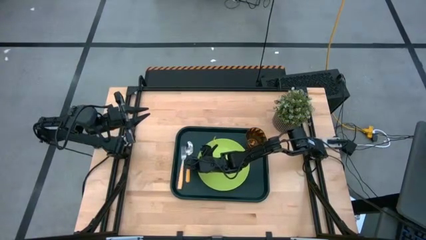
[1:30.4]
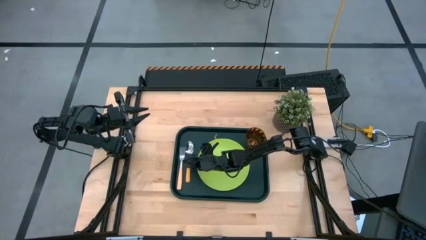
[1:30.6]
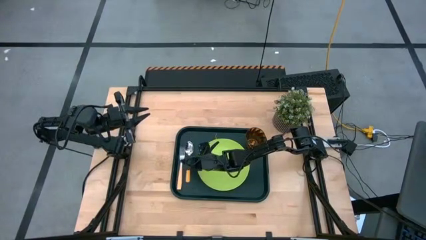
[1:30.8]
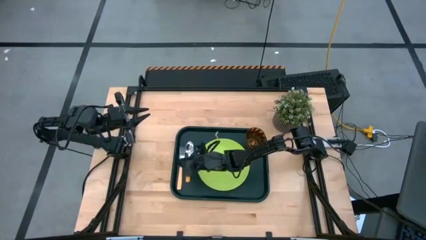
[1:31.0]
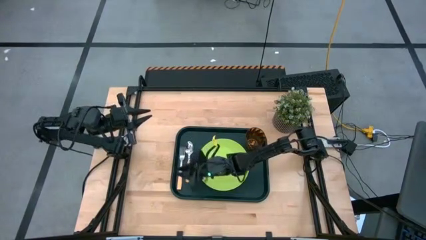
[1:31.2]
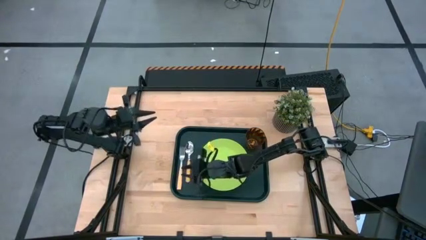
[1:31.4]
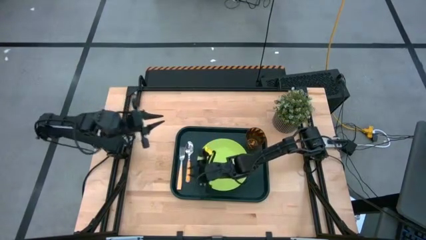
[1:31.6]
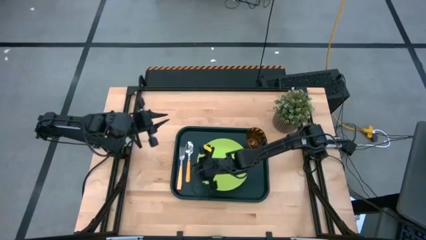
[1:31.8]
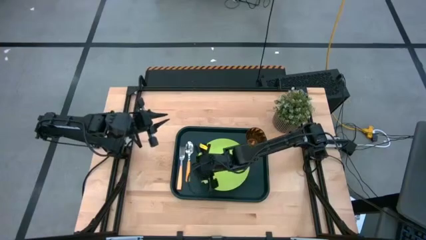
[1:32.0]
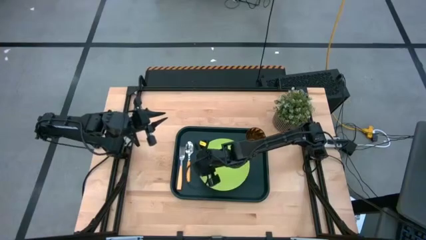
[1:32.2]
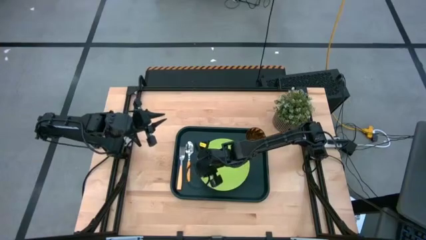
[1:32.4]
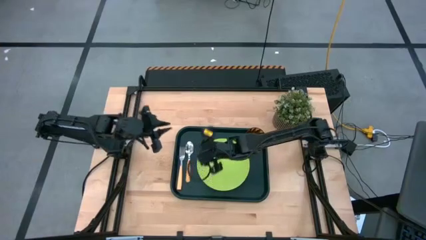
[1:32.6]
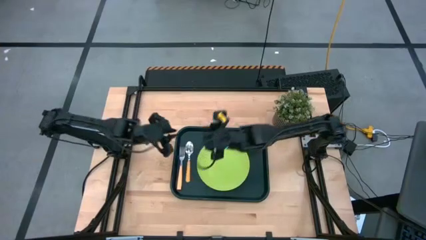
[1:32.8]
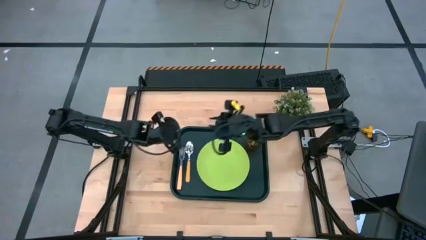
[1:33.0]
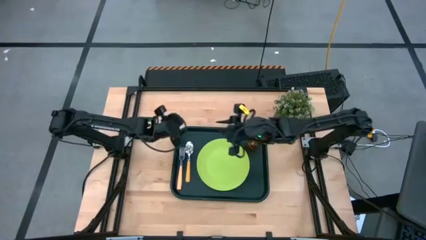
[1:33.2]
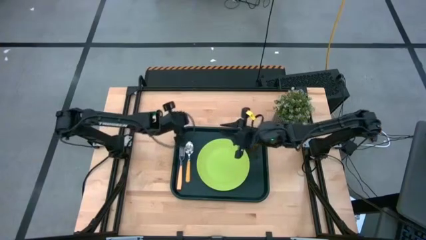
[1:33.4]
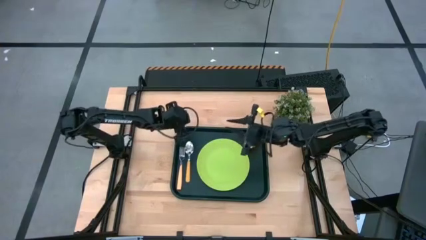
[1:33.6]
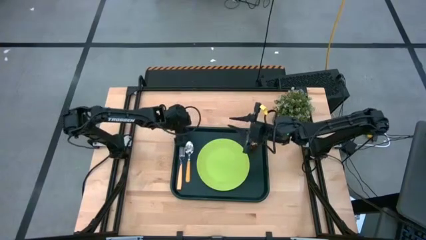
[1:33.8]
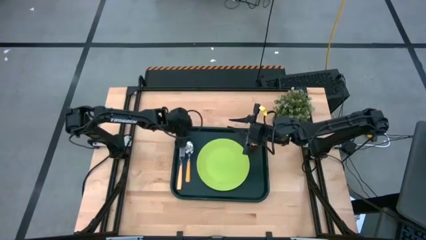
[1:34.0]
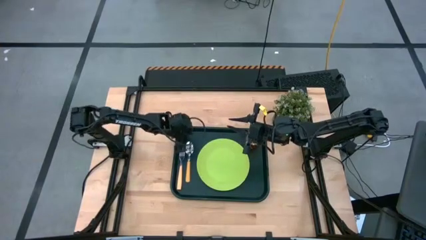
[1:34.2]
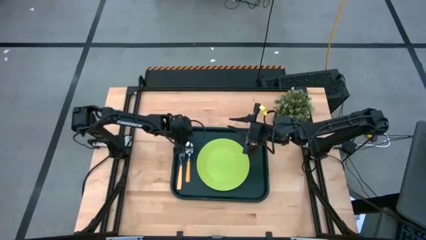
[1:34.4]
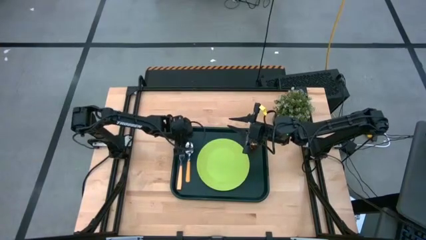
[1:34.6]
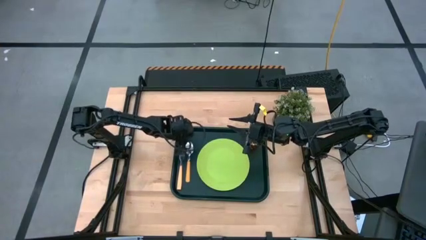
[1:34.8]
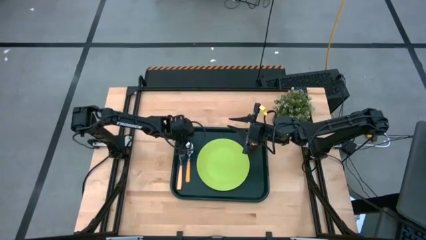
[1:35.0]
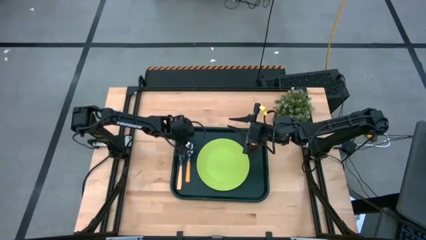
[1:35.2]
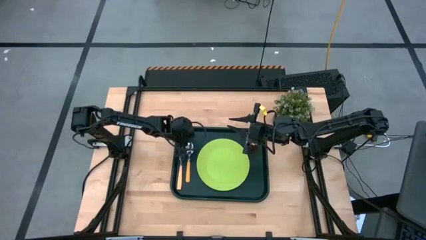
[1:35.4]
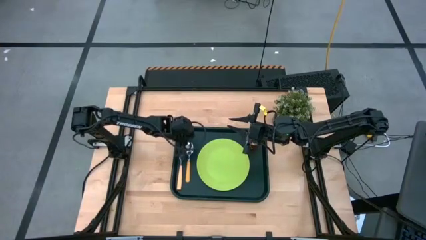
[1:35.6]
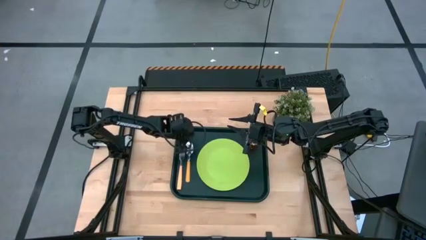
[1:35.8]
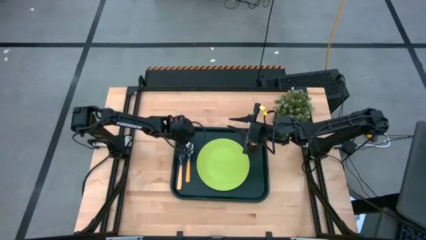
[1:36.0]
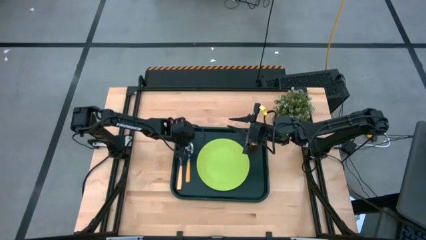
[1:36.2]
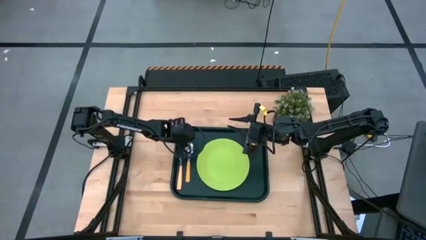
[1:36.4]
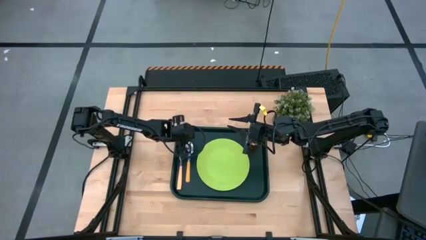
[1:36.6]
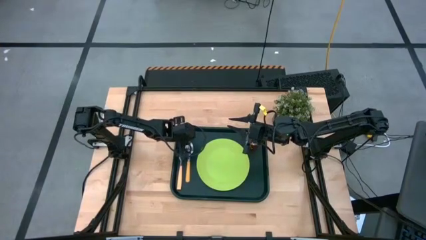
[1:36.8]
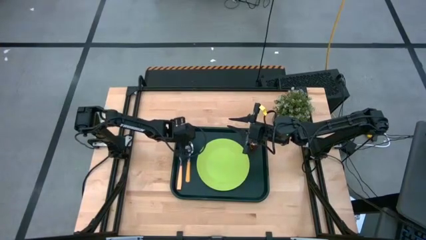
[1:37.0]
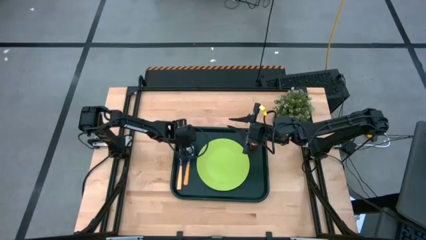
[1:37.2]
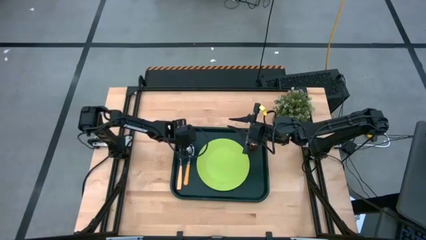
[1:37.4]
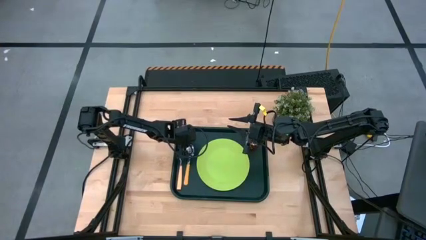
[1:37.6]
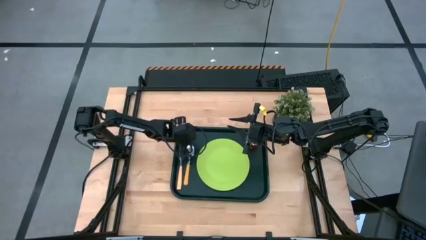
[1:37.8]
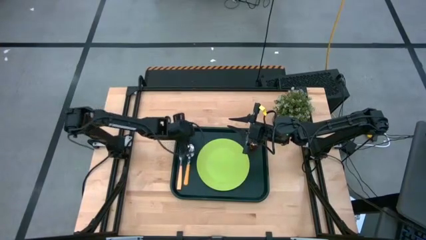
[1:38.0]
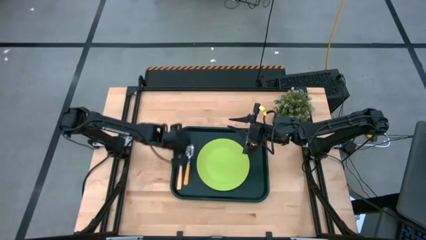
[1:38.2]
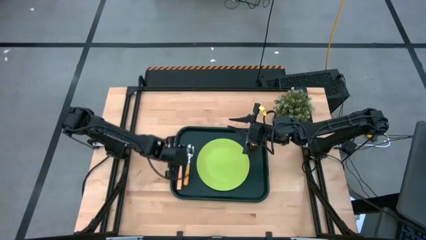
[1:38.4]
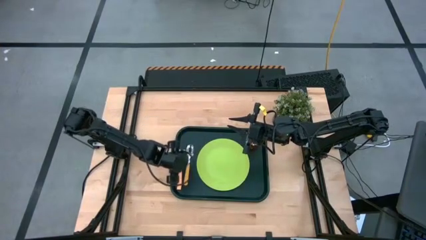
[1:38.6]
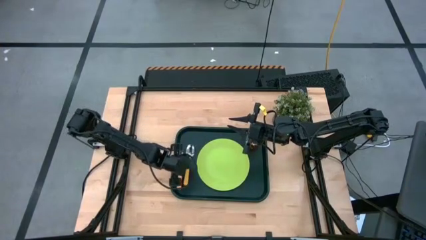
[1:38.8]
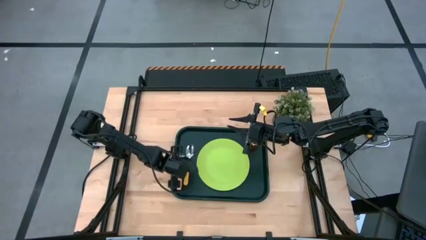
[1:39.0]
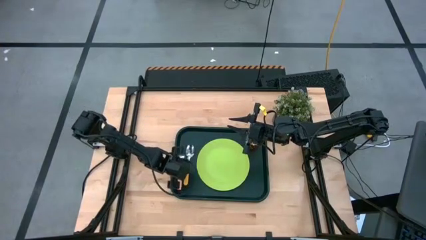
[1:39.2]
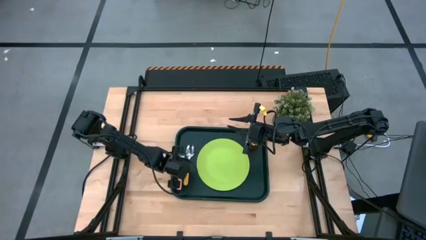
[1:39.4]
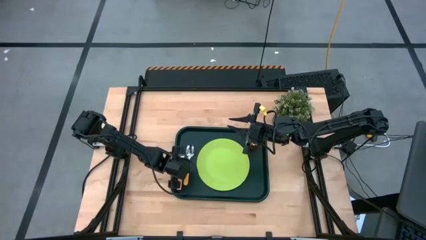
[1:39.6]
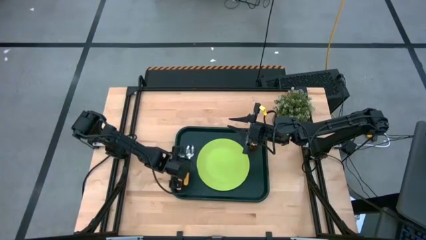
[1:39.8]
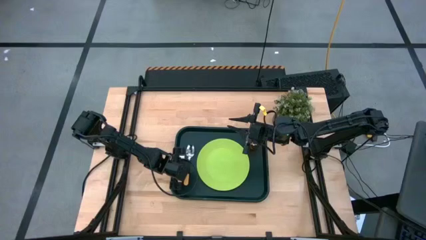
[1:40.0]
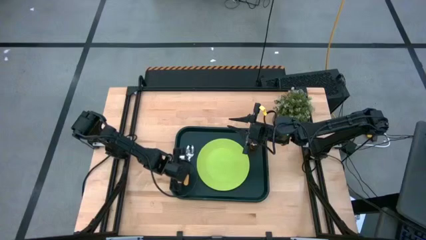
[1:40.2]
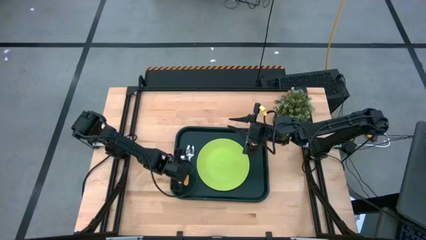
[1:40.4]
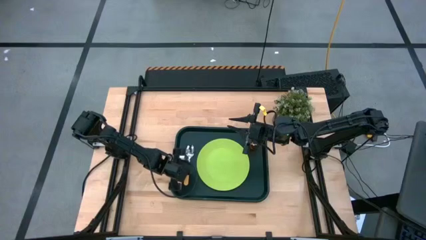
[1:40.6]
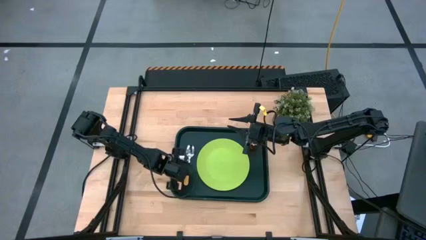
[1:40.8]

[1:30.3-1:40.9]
Task: Pick and place plate/cup/fork/spoon on tray
Adjust the orange spoon on the black tray

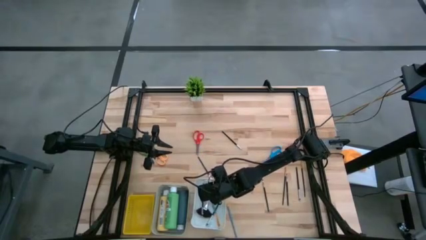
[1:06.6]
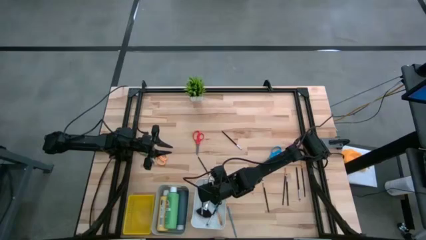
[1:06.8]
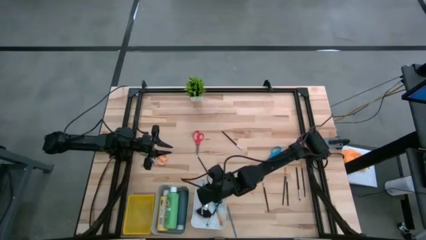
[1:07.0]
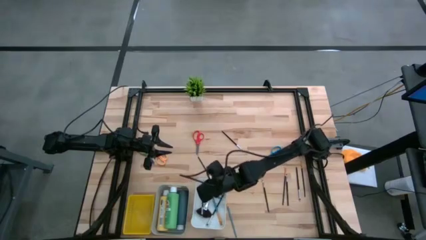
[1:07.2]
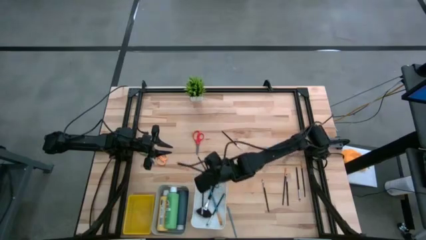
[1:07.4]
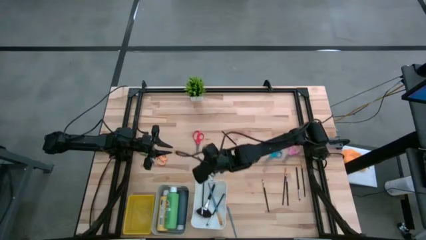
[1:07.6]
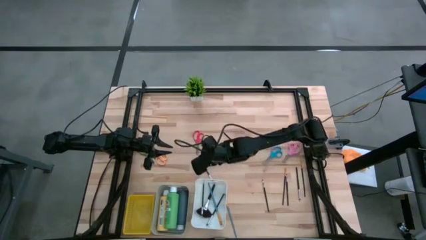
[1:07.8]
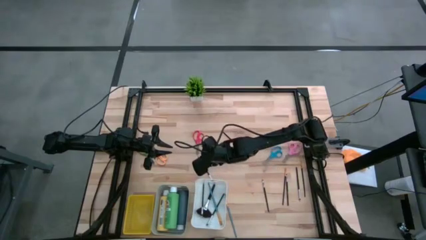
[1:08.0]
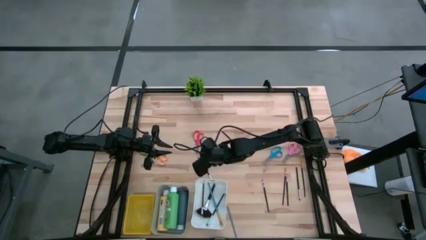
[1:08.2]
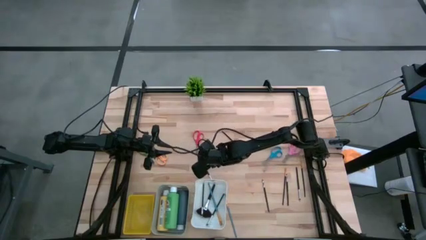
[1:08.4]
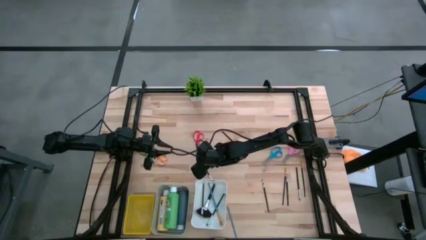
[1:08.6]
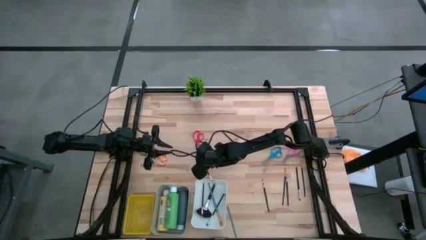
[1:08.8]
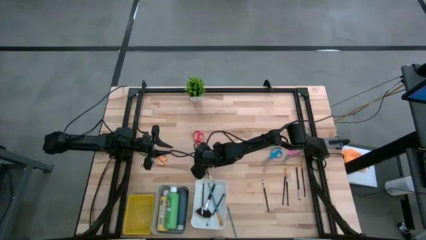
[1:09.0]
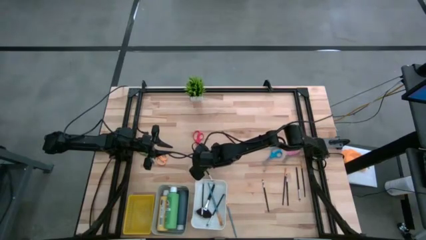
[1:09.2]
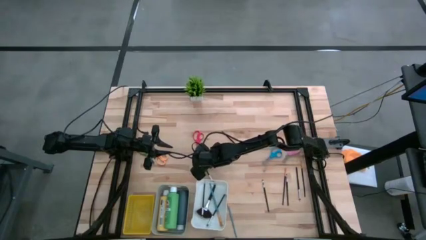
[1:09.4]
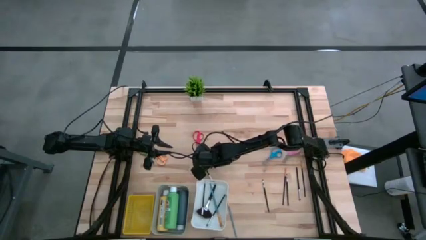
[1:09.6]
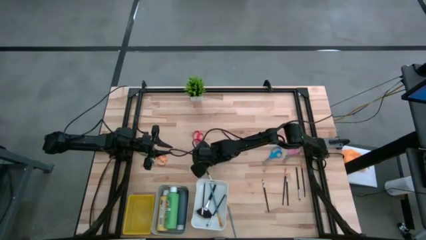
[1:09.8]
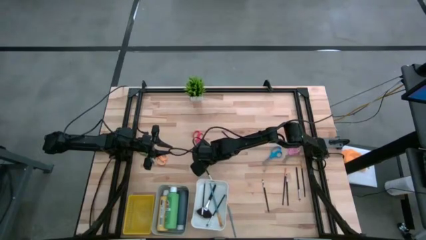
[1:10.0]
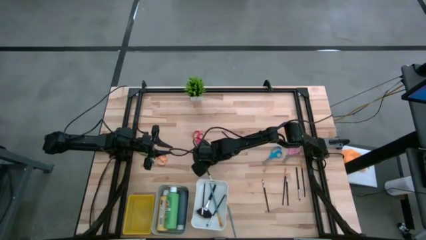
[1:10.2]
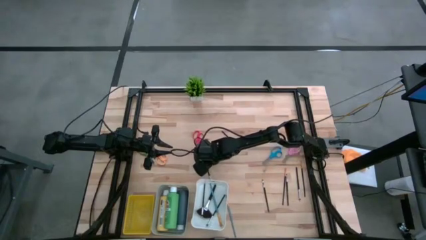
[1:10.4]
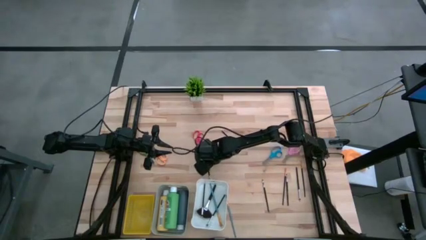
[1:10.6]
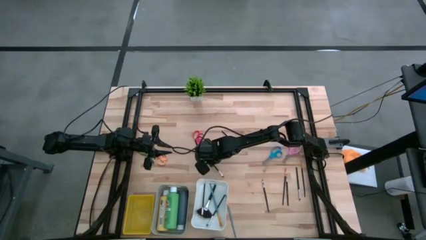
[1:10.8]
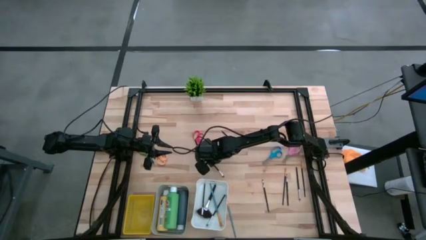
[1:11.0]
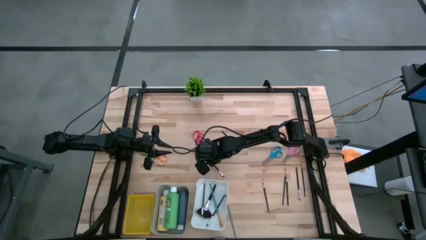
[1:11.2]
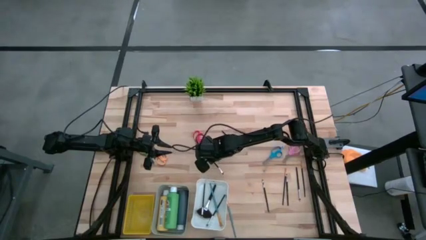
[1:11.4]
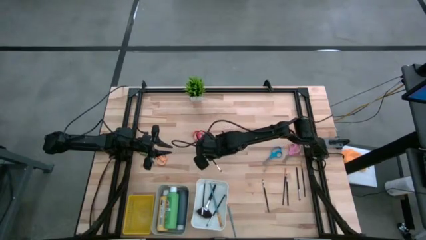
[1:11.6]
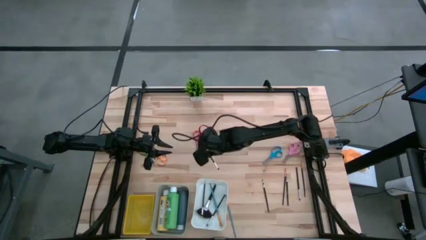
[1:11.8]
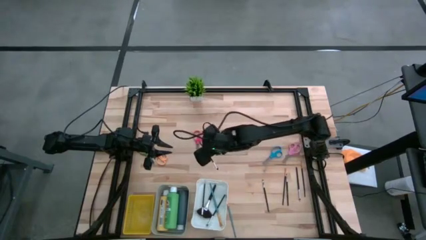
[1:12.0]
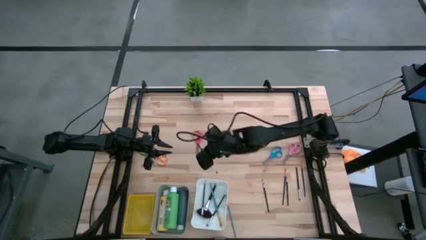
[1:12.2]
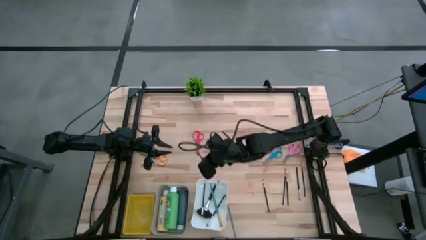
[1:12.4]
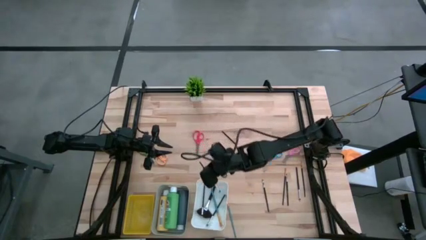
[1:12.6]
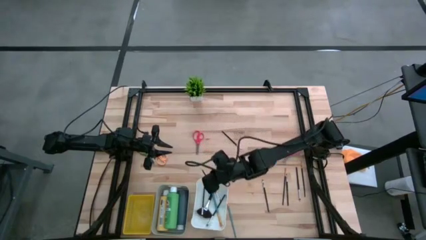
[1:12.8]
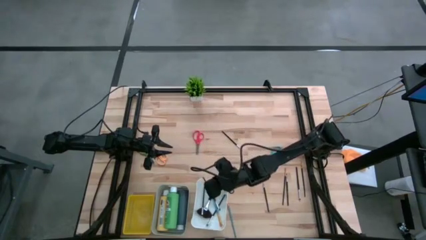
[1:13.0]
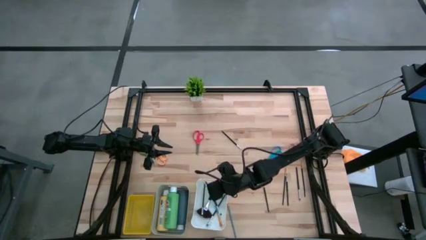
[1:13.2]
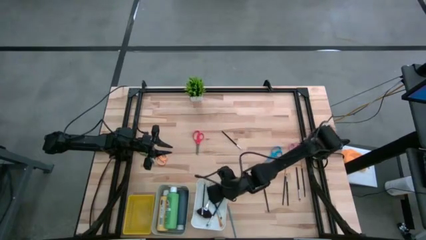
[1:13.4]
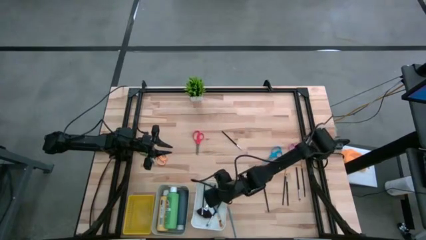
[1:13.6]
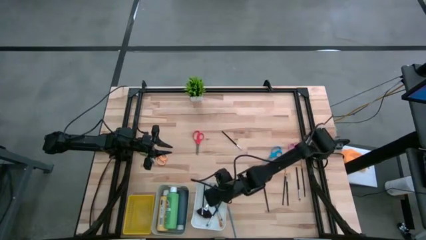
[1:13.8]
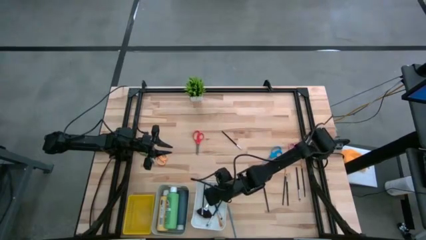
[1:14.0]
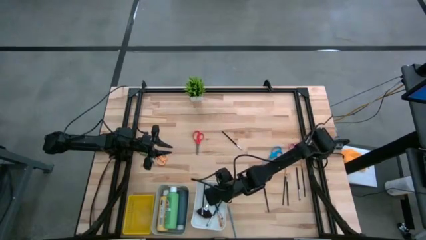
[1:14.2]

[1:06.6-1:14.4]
Task: Pick & Place Paint Supplies
Put the black paint brush into the white bin
